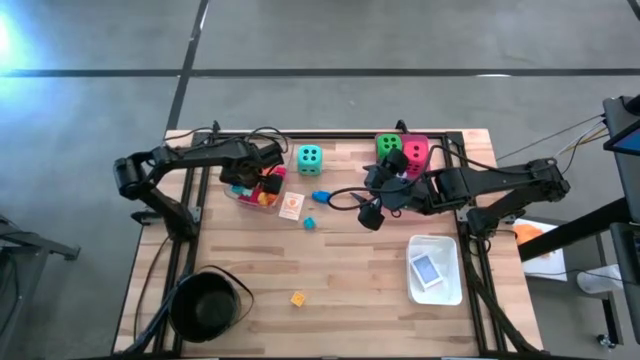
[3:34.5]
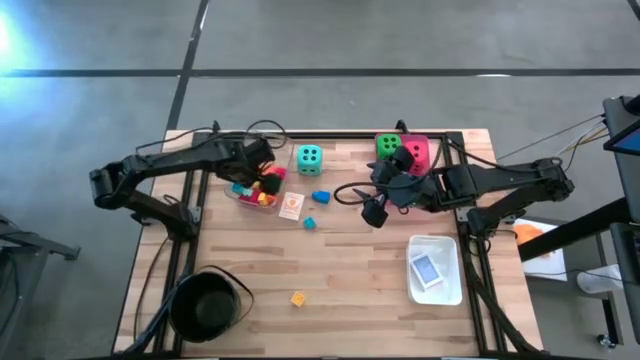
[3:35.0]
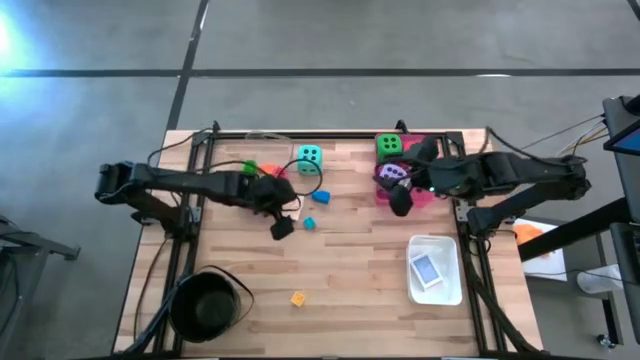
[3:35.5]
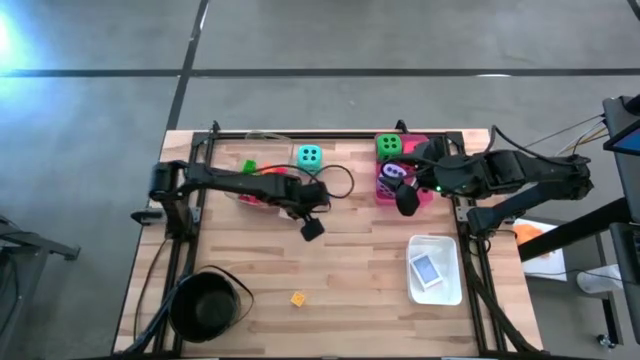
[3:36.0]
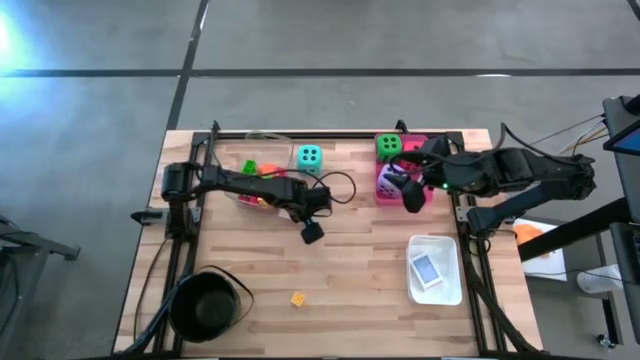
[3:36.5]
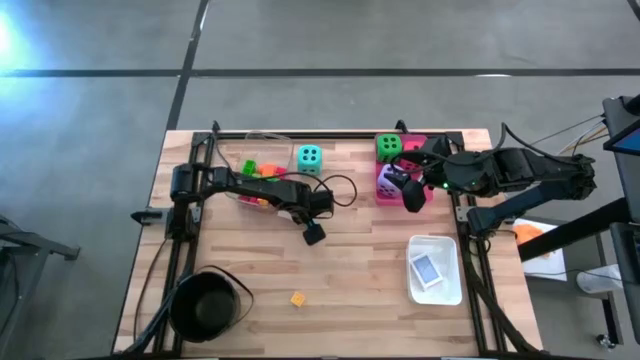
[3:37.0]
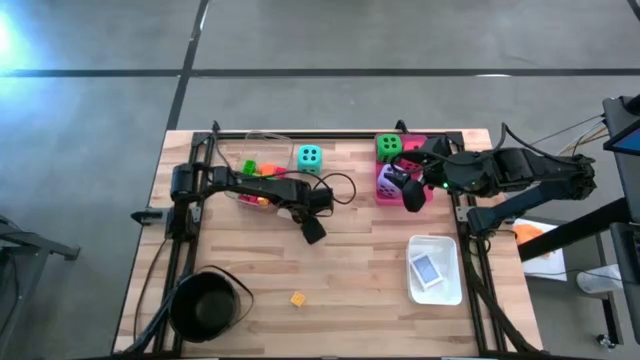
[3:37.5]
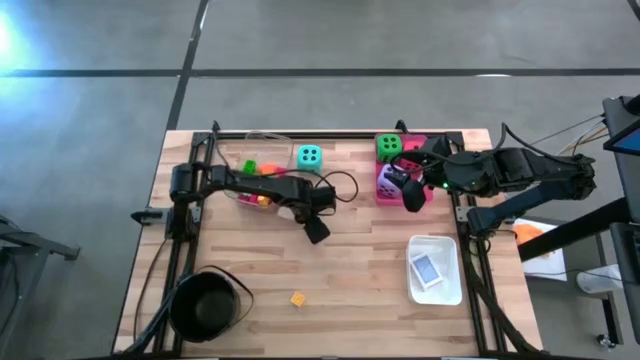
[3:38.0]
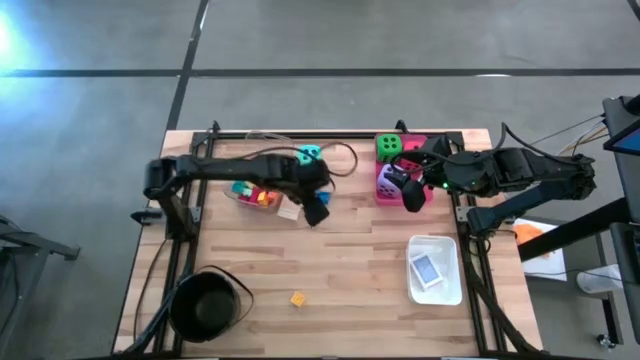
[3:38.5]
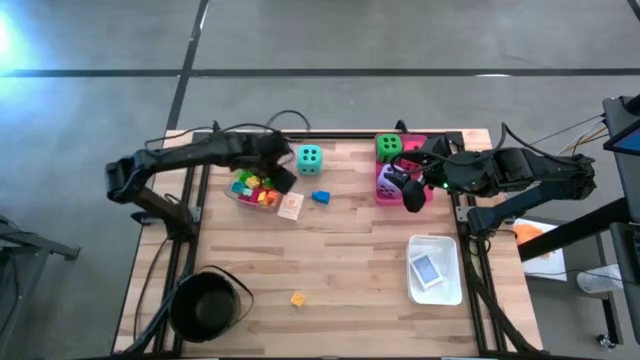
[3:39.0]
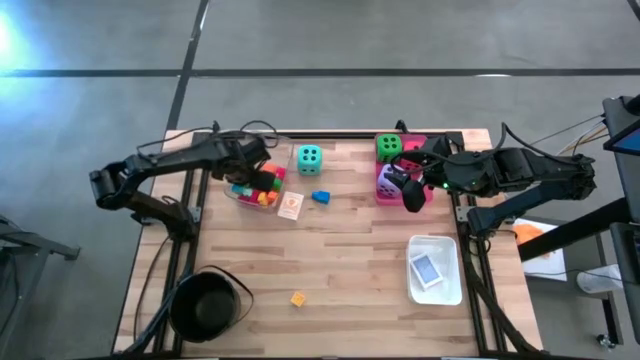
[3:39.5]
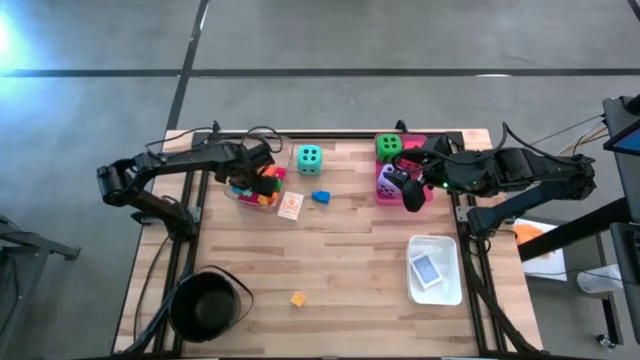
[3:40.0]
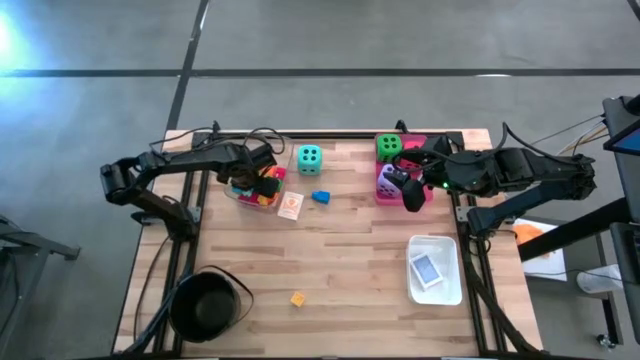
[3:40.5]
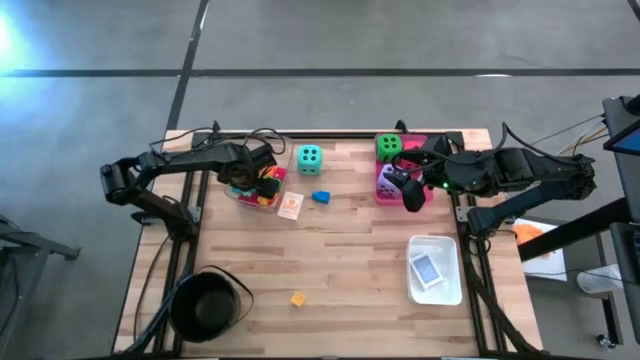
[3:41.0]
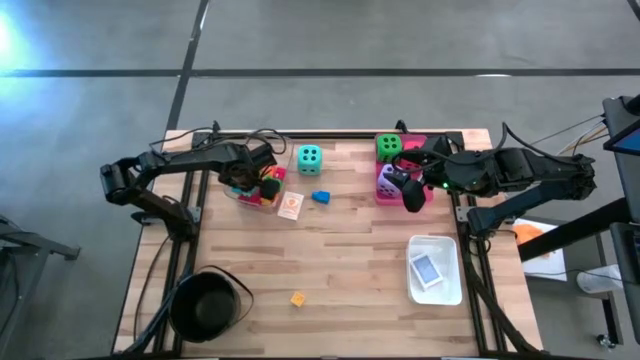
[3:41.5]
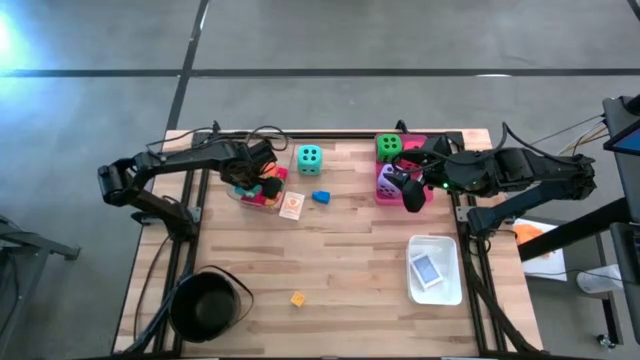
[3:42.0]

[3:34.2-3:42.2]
Task: Pick & Place Toys
Put the light blue game piece into the transparent bin

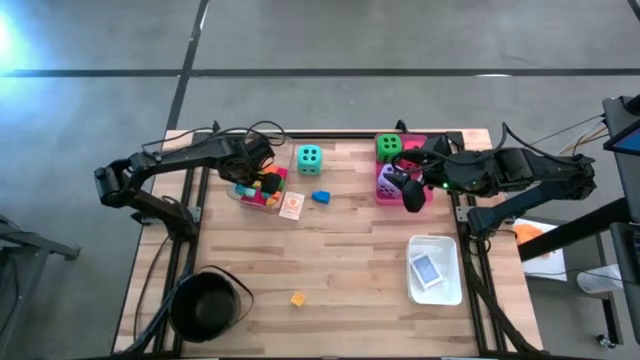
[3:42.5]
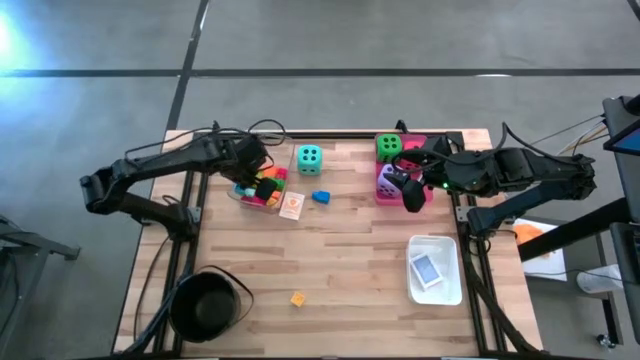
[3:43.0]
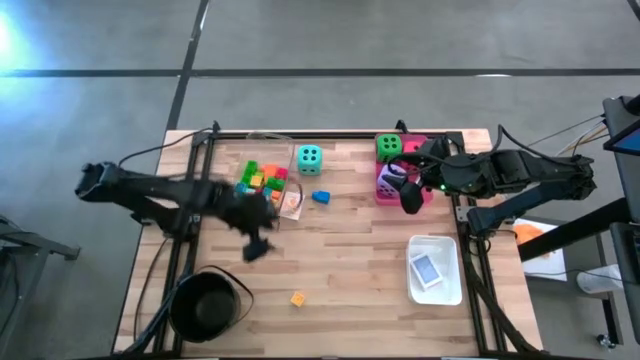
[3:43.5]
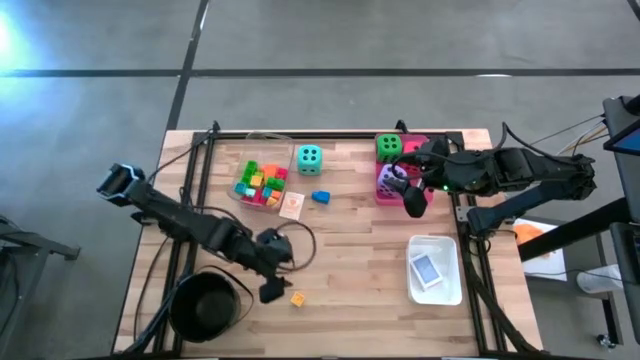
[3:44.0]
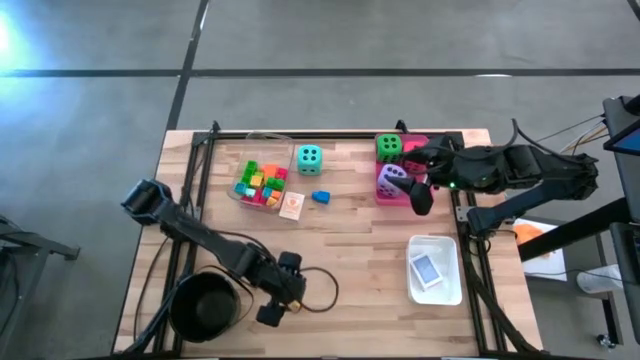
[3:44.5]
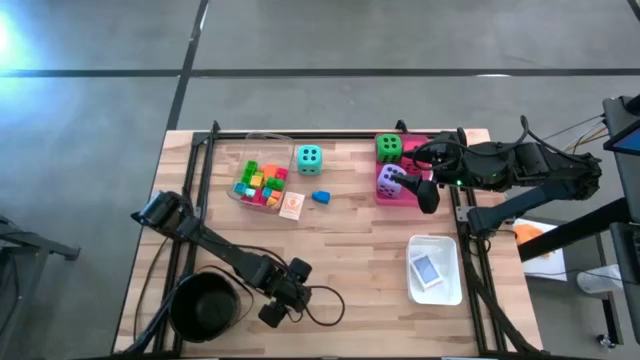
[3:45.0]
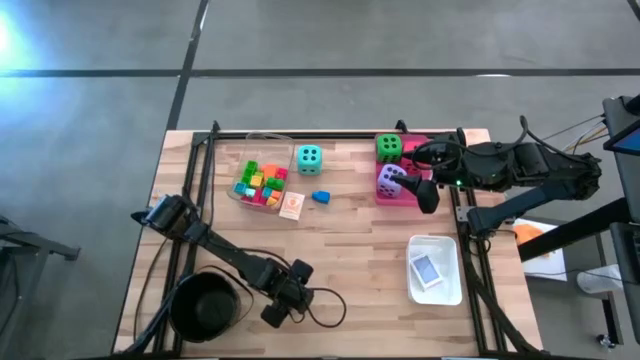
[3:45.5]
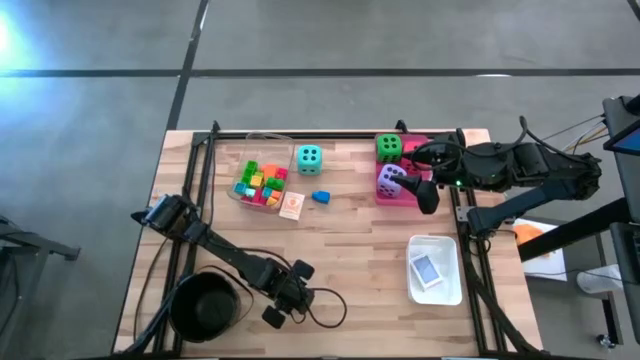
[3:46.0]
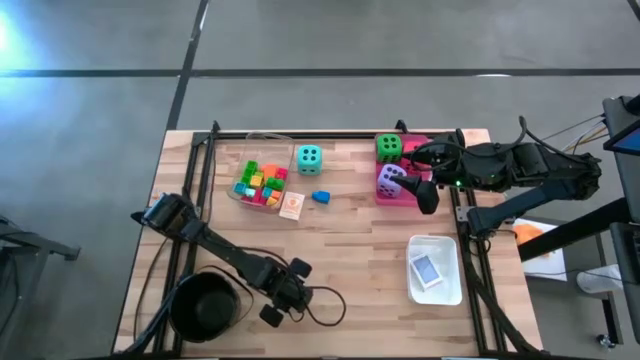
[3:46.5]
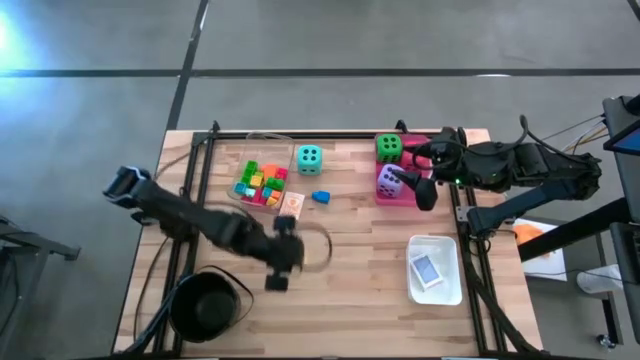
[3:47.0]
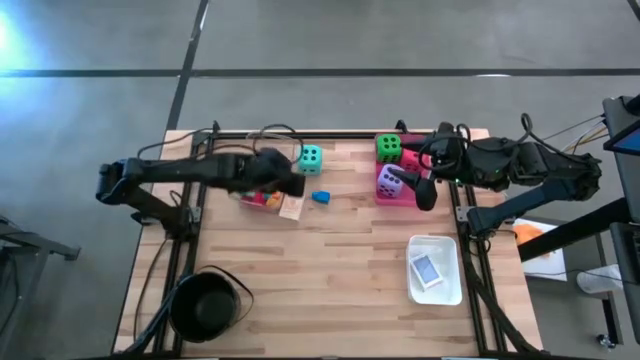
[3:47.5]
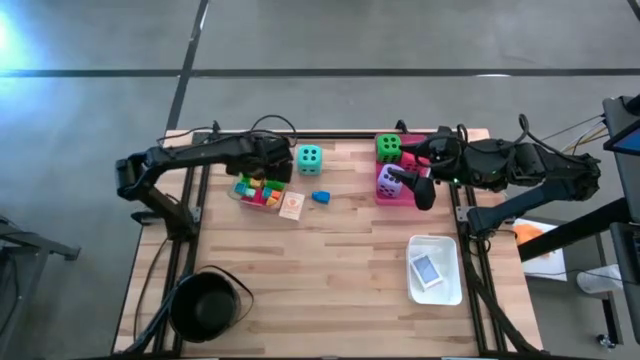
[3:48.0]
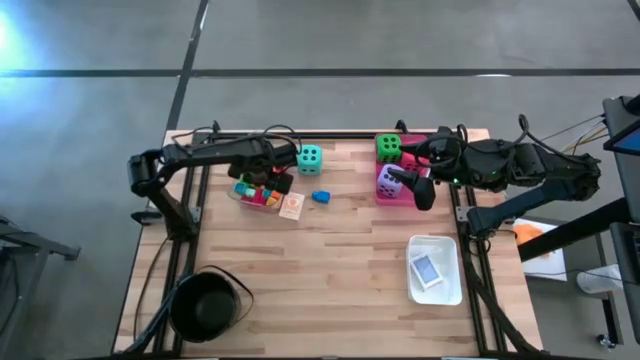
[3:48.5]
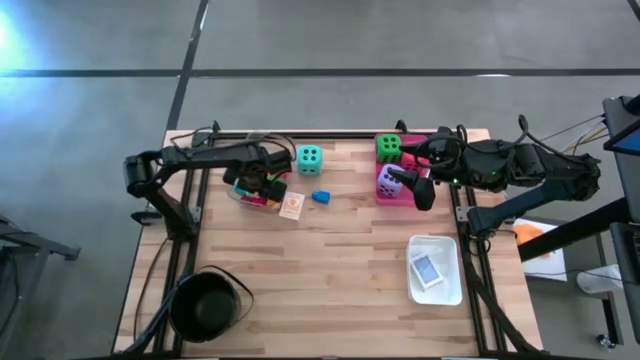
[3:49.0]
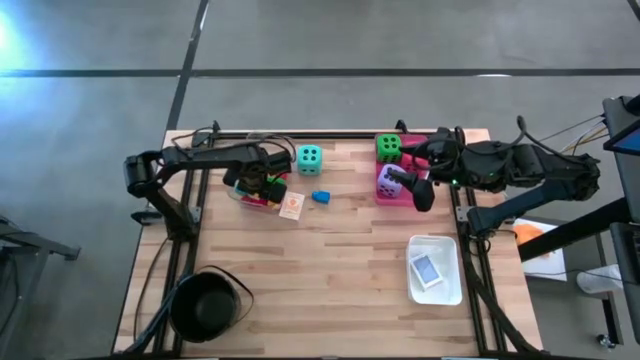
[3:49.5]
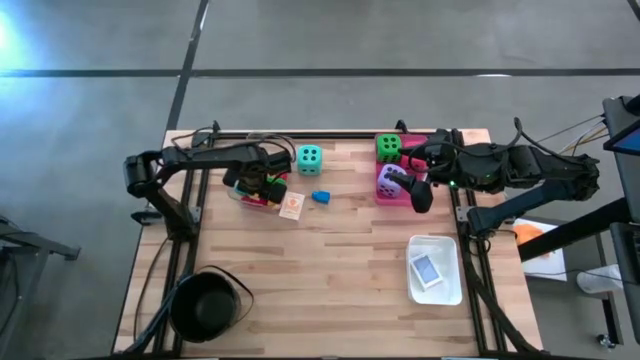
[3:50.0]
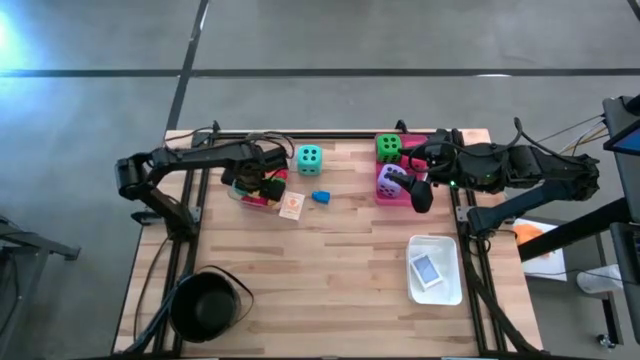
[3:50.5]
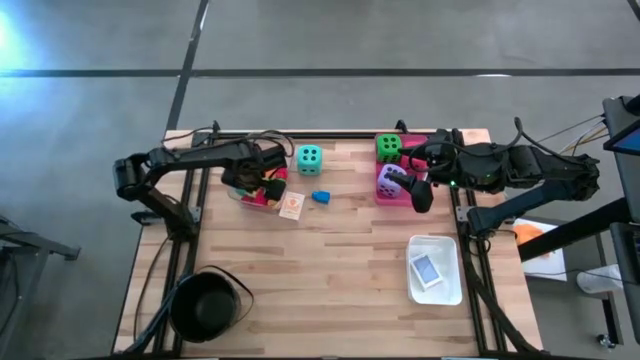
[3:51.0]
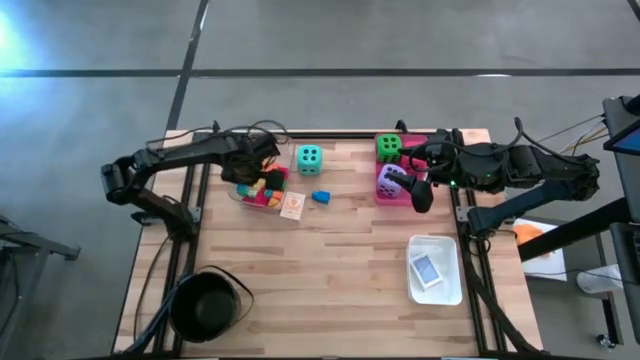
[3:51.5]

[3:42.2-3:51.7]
Put the light yellow game piece into the transparent bin

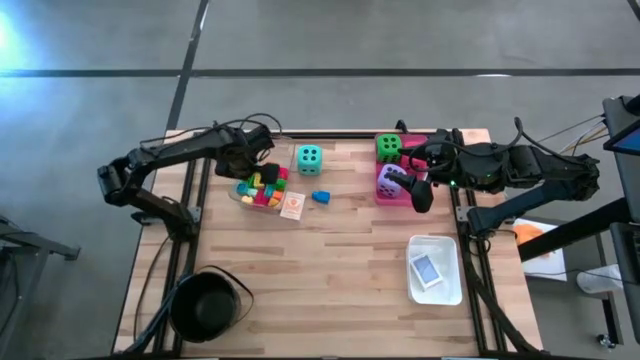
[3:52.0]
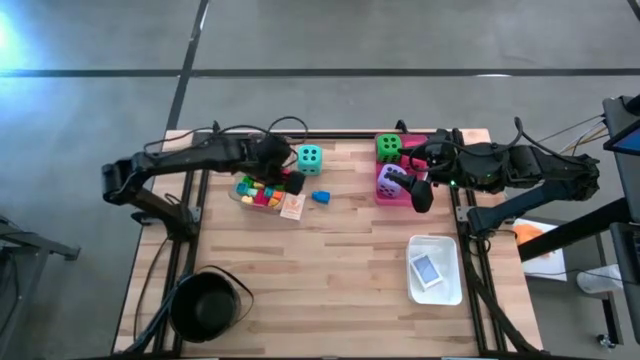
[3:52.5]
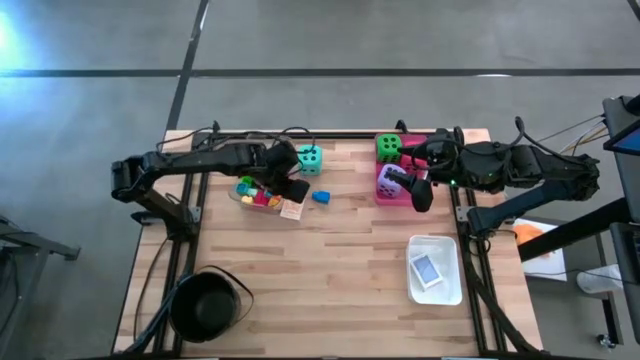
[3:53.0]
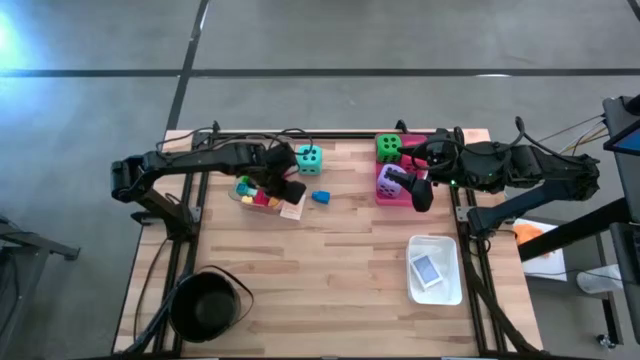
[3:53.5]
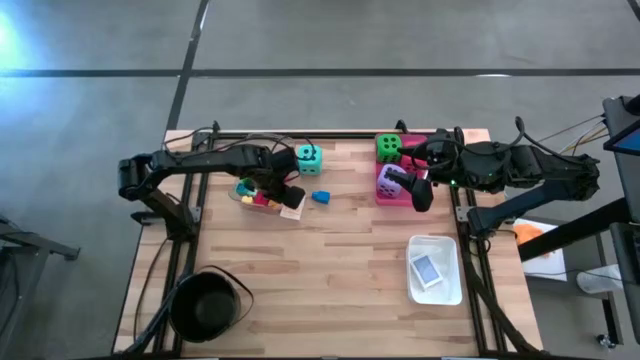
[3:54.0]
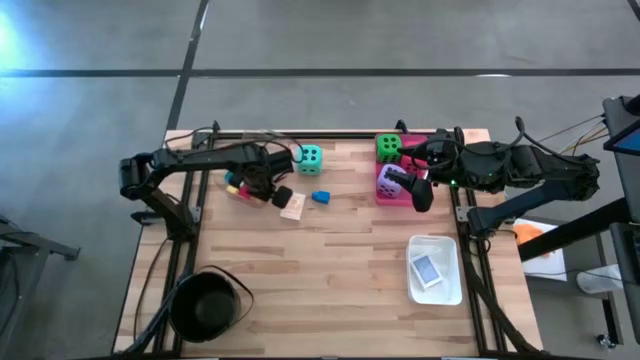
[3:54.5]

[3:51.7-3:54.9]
Adjust the transparent bin on the table

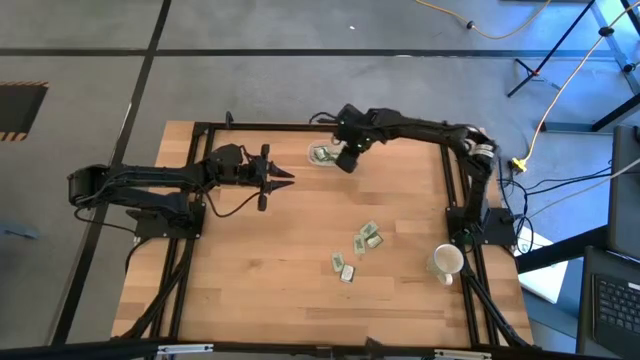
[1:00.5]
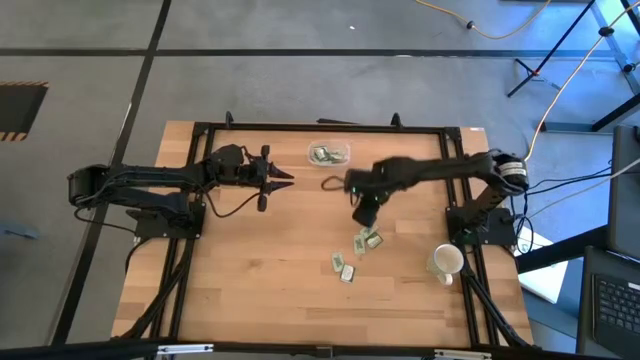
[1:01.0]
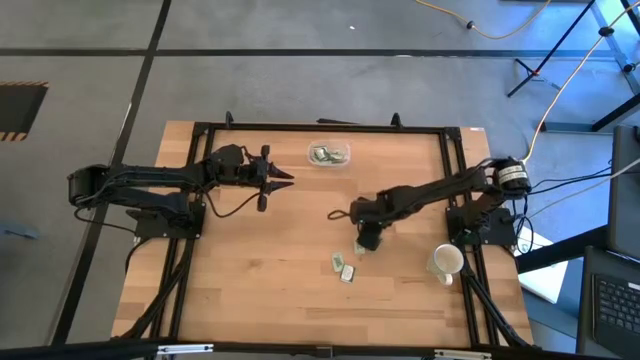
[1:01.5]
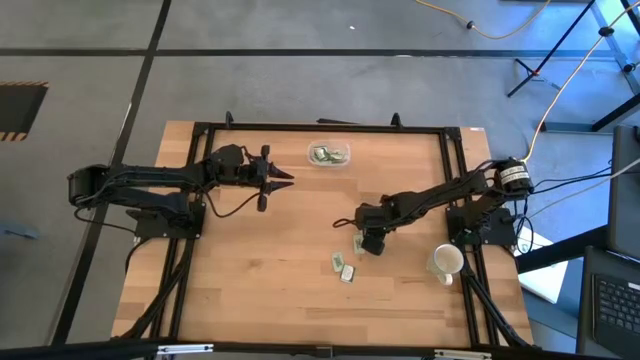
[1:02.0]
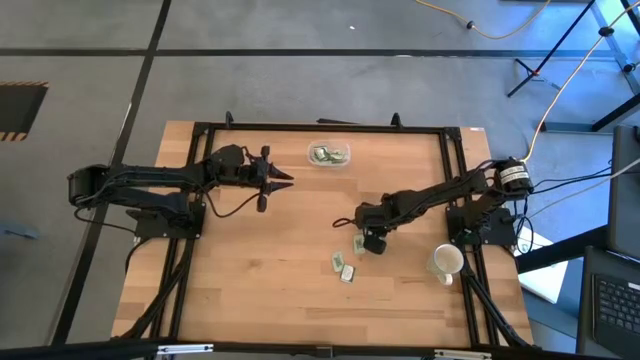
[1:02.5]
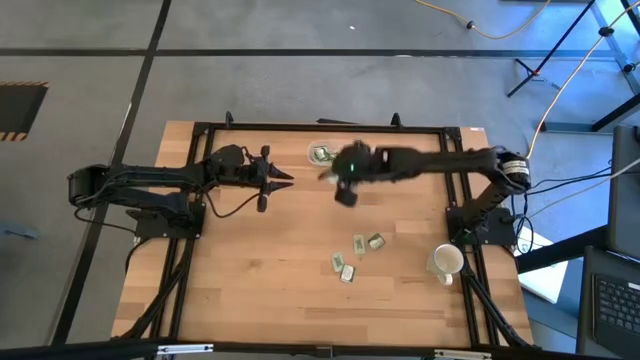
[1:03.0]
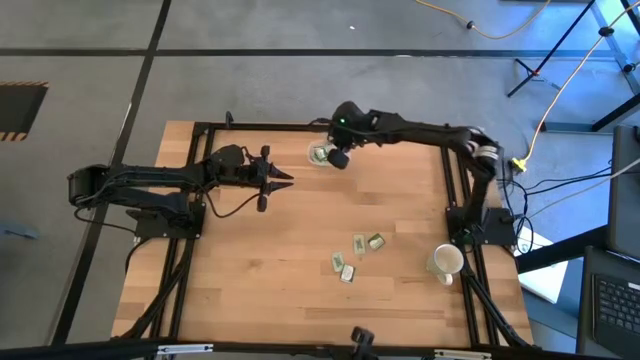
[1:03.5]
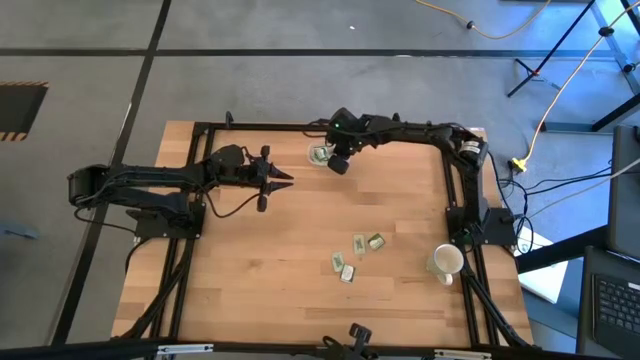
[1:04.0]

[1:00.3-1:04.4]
Task: Pick and place items into bin
Put the white stevia packet into the transparent bin
